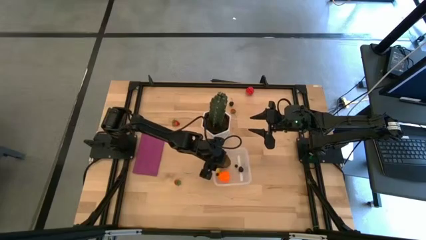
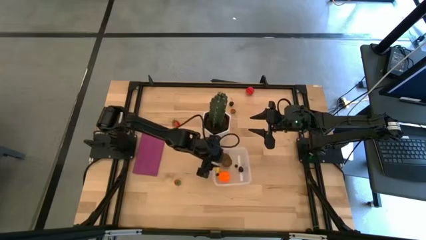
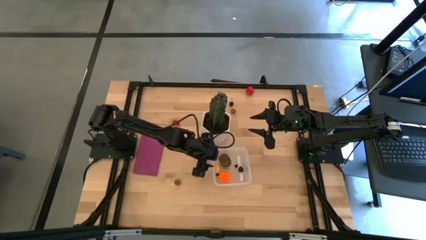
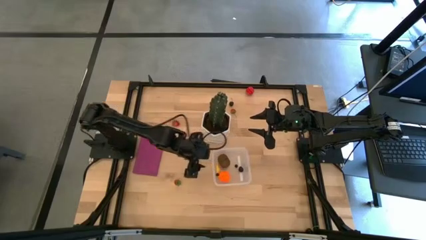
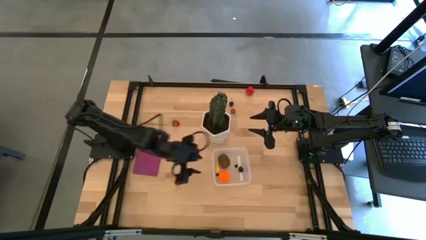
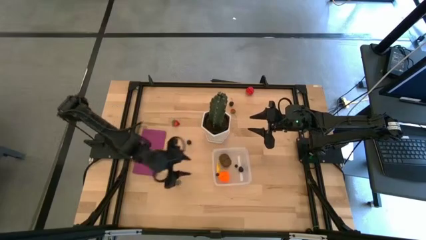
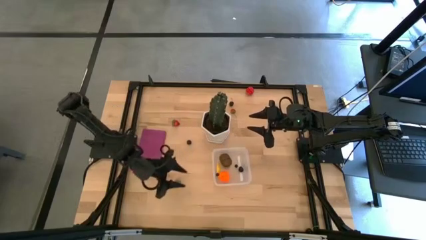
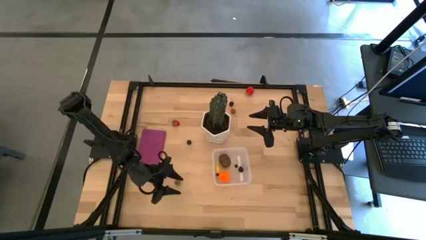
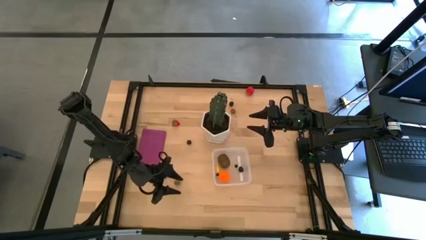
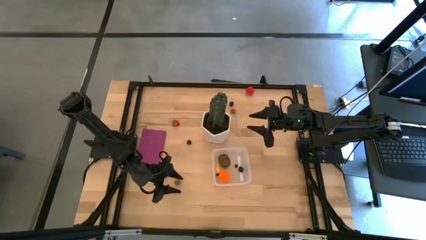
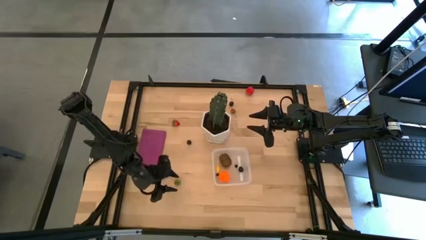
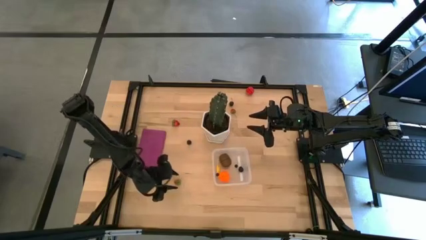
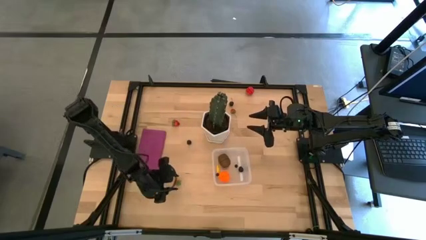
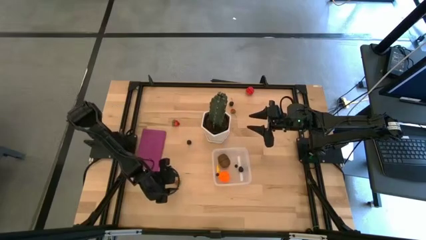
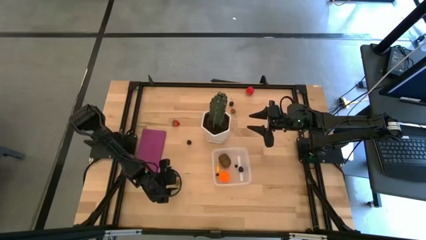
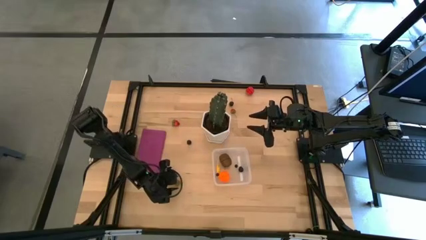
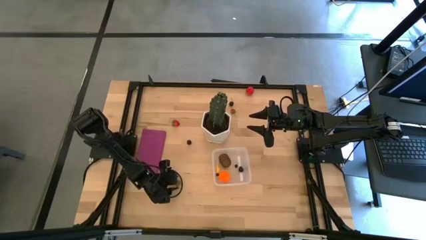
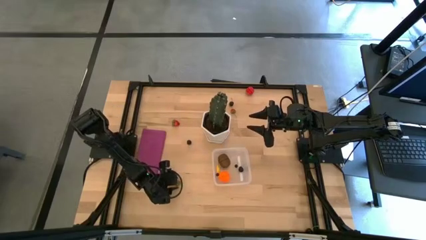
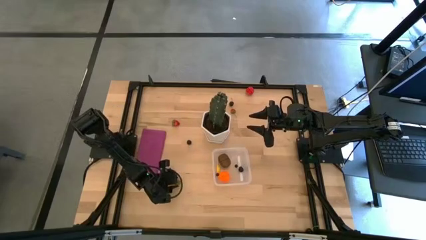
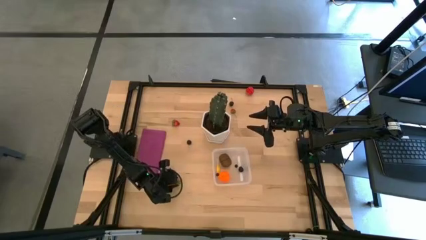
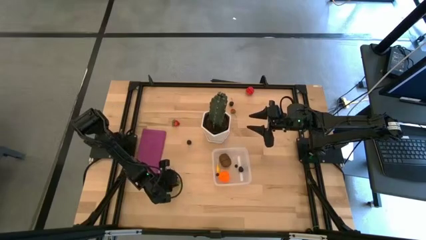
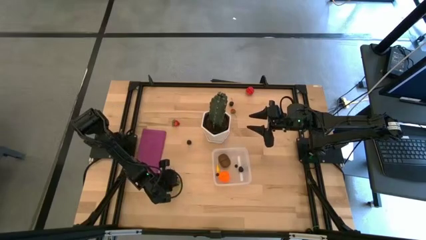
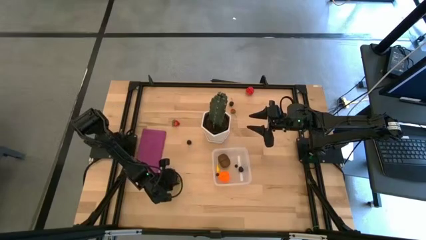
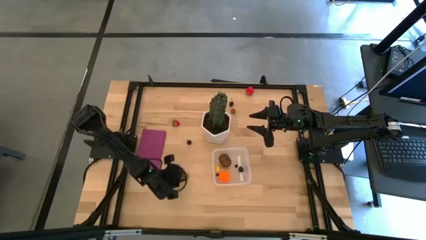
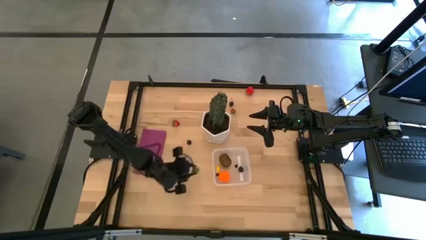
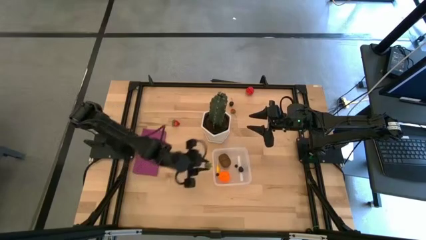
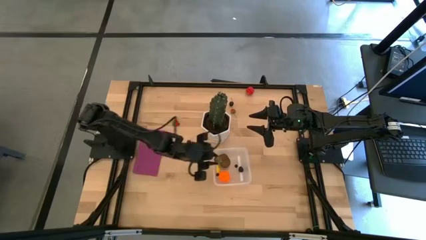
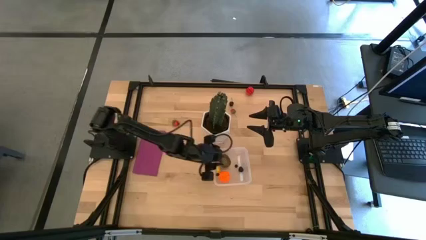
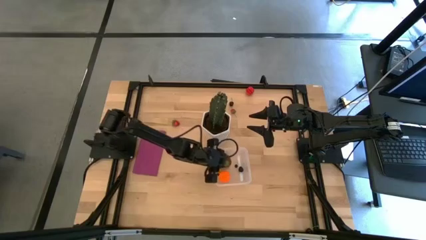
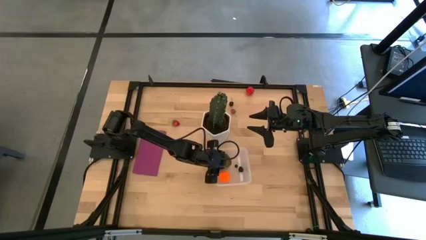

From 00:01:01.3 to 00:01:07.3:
Task: Pick and placing Produce into tupperware
Put the bottom strawberry into the transparent bin

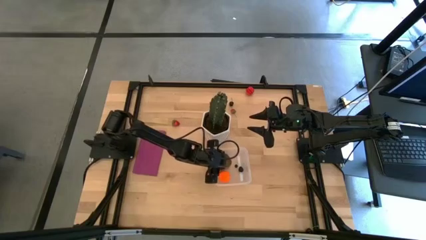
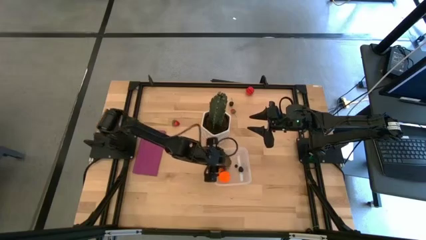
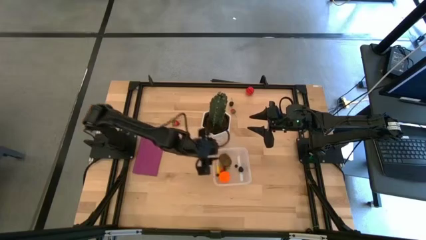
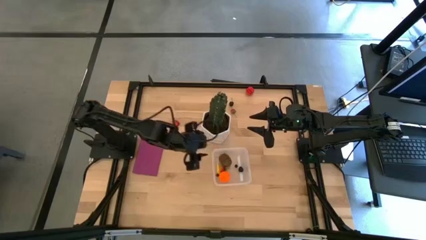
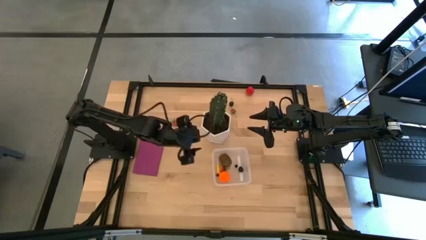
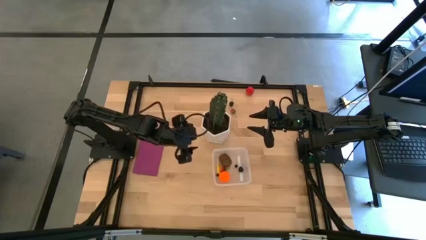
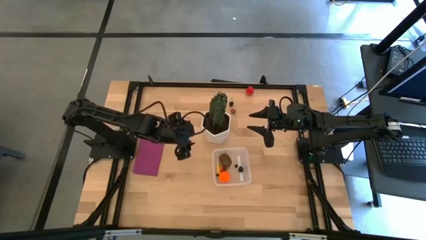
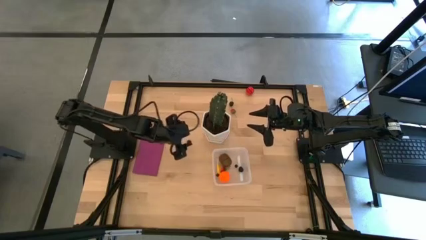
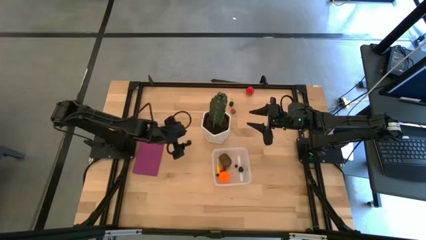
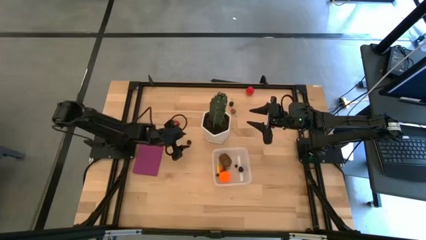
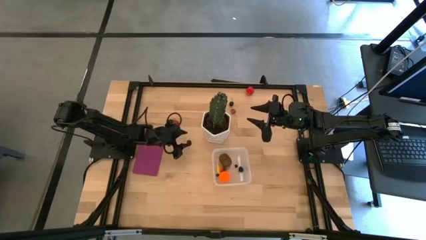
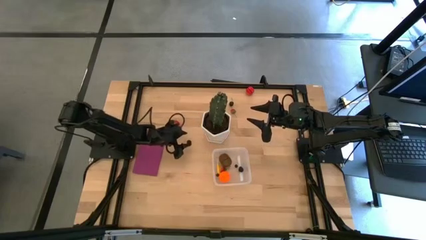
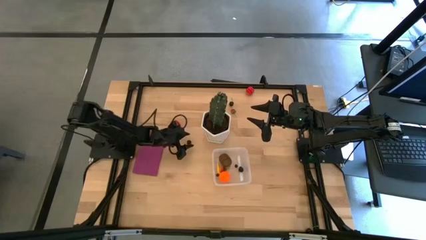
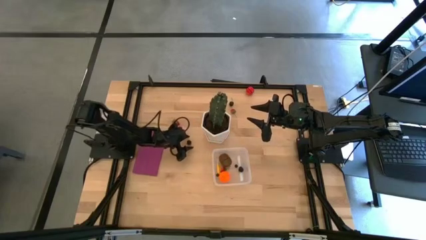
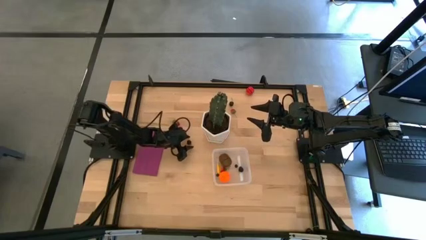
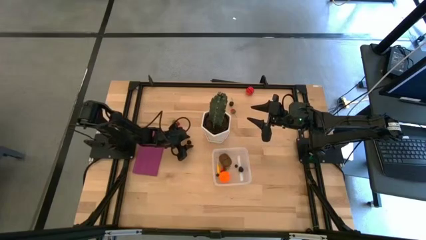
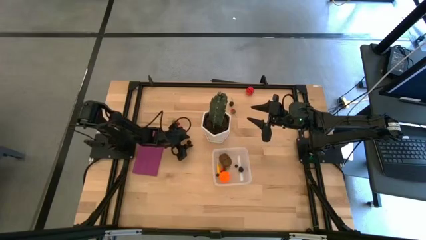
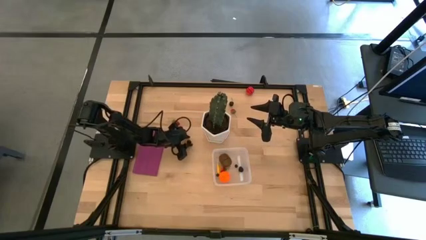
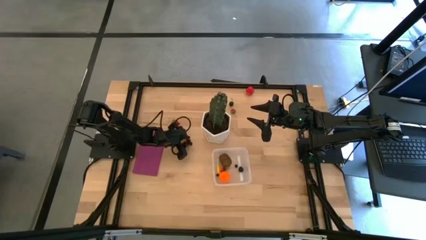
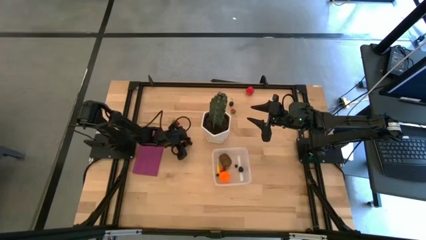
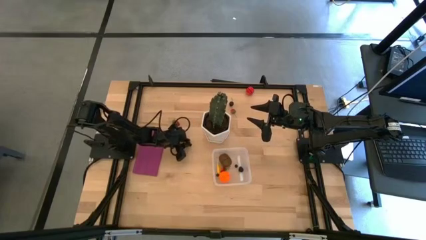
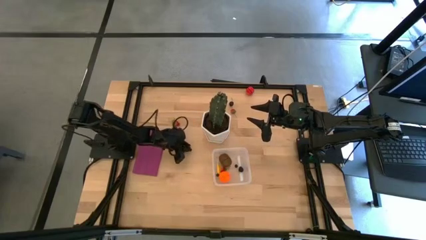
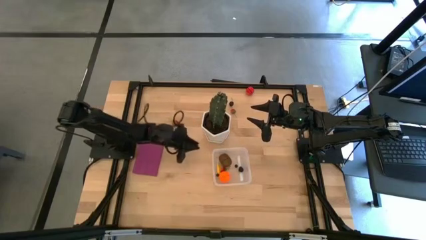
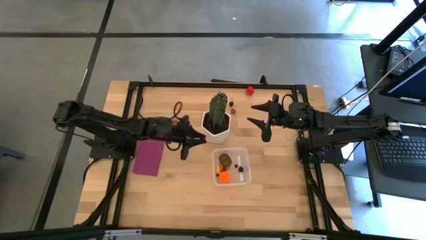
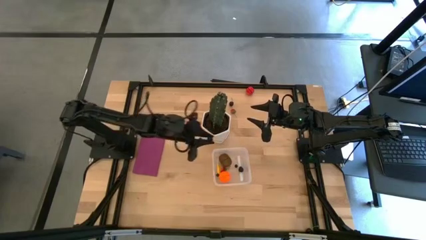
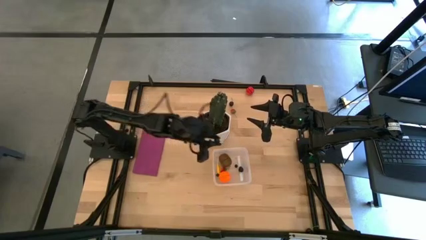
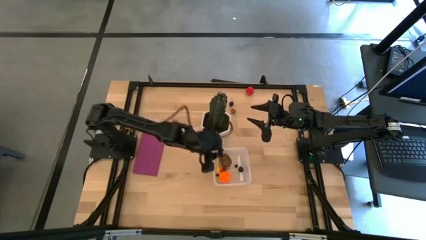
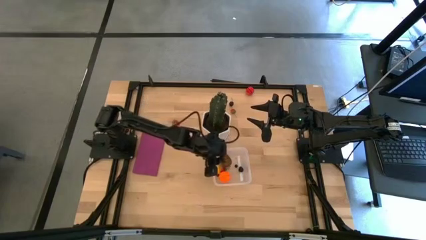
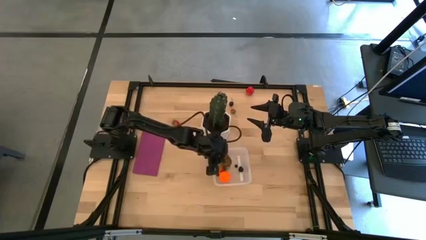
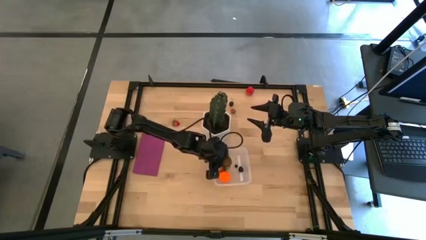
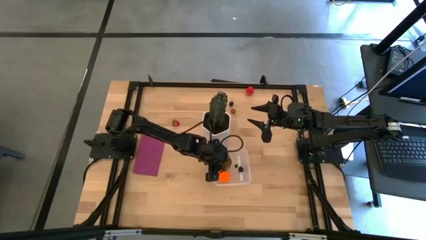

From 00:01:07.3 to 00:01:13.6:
Put the blackberry into the transparent bin

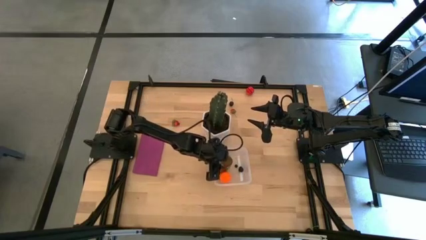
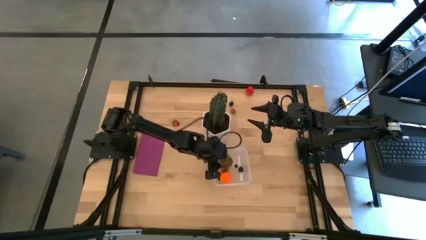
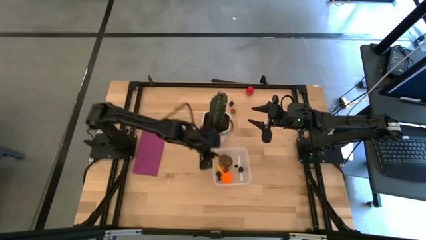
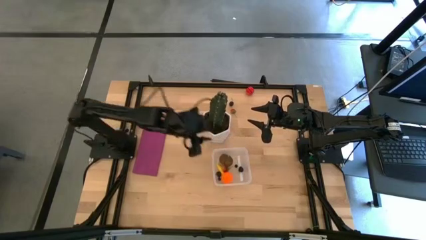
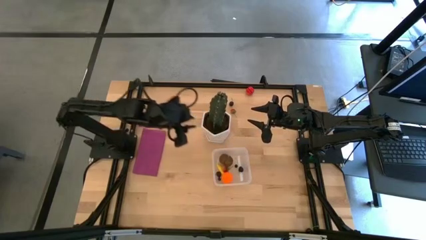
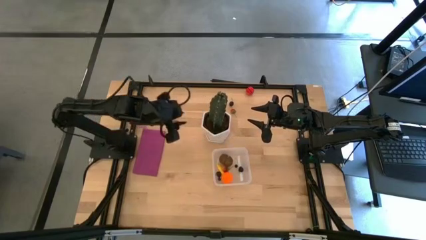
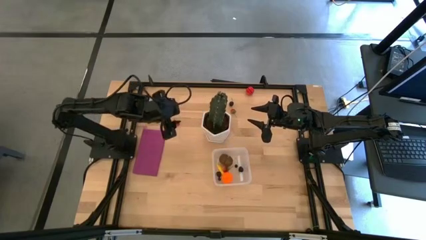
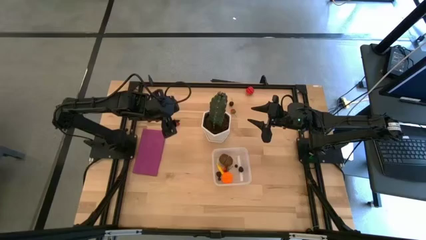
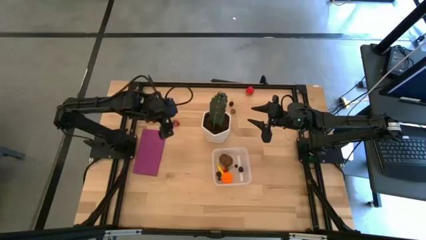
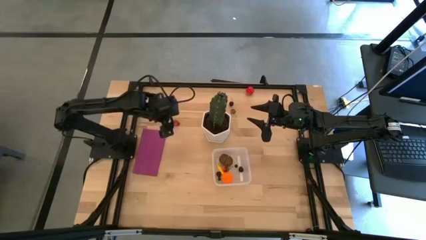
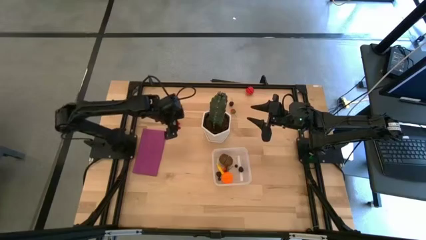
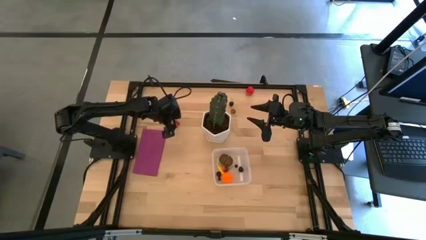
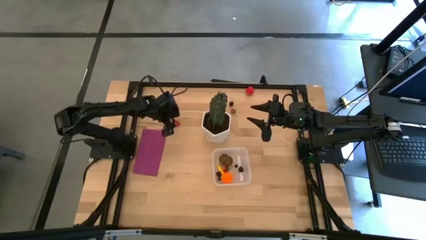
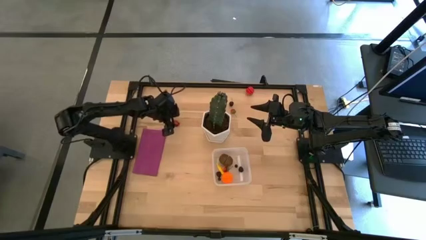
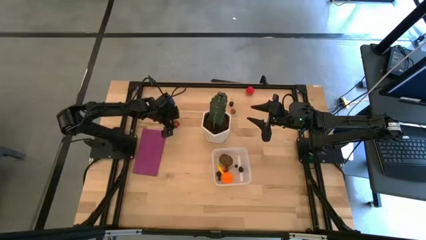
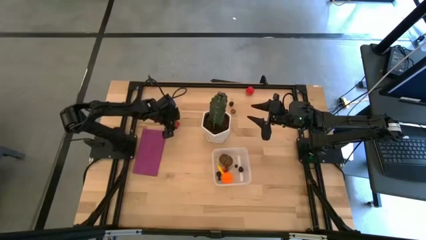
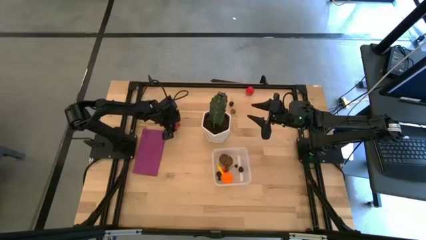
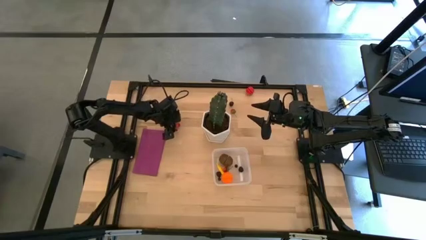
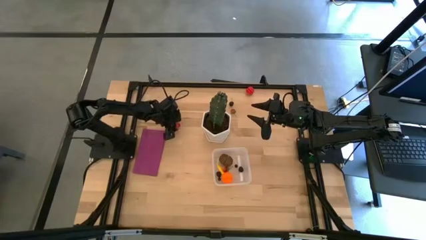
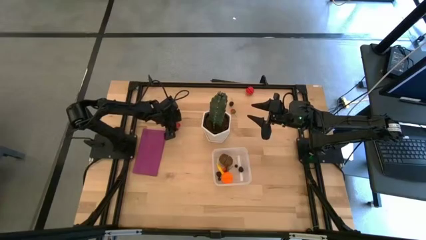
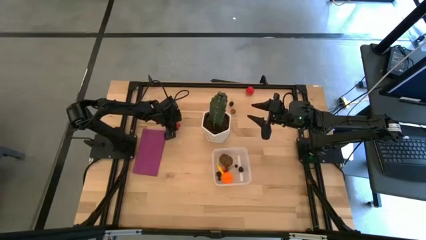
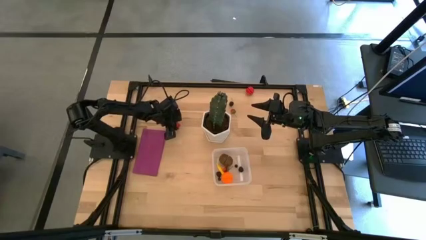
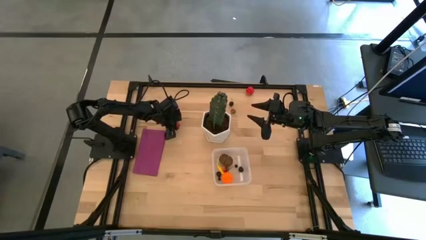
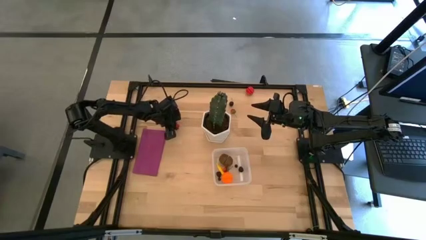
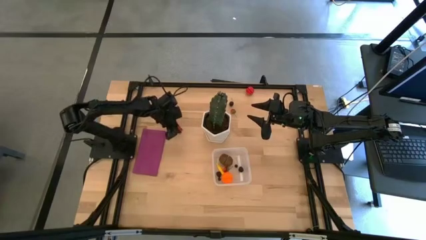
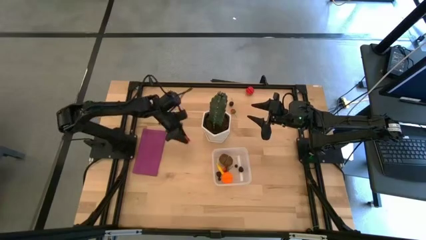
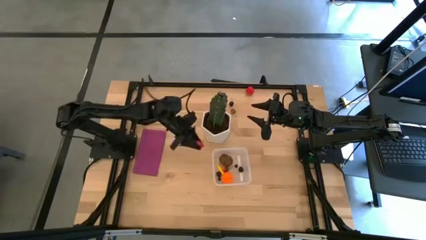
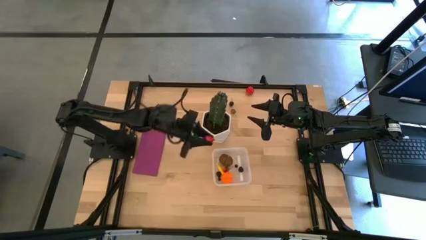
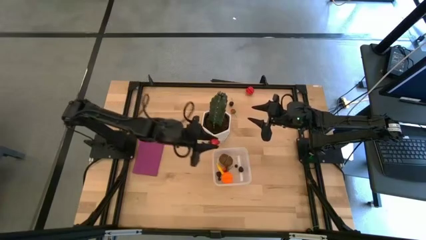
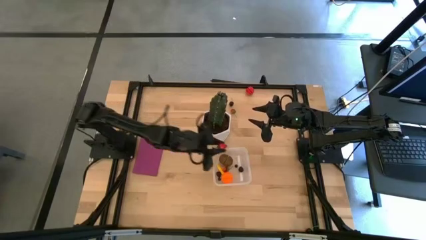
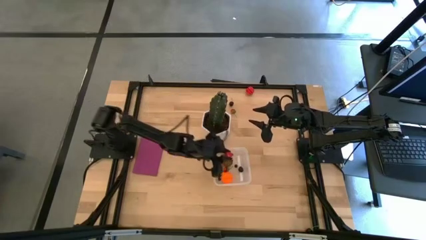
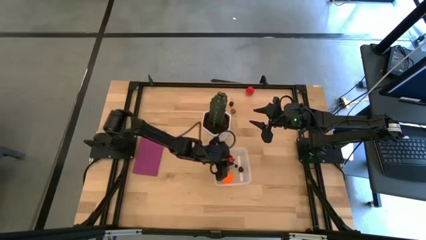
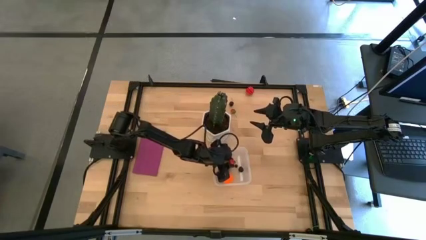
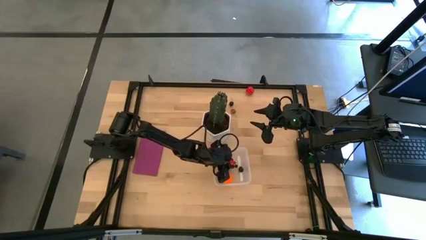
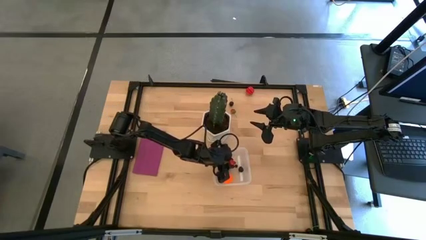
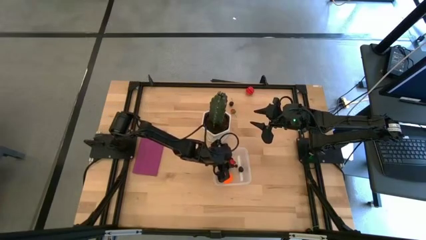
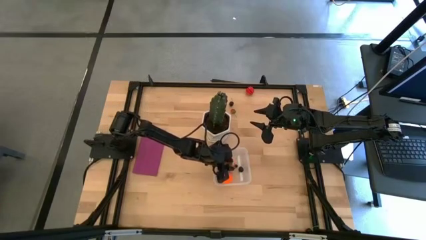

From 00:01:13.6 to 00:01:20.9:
Put the left strawberry into the transparent bin
